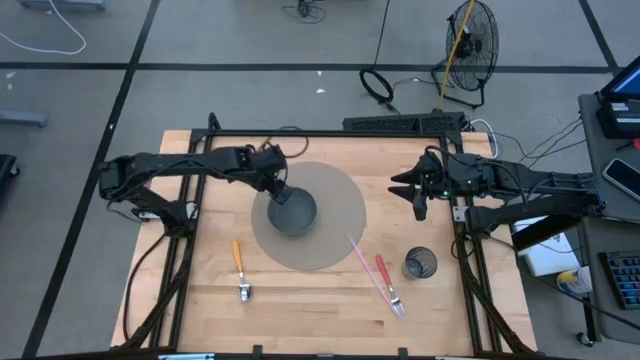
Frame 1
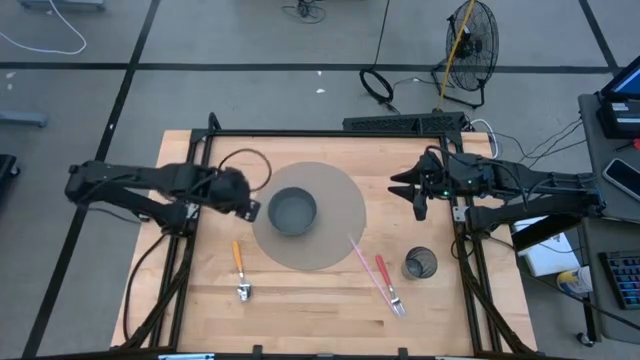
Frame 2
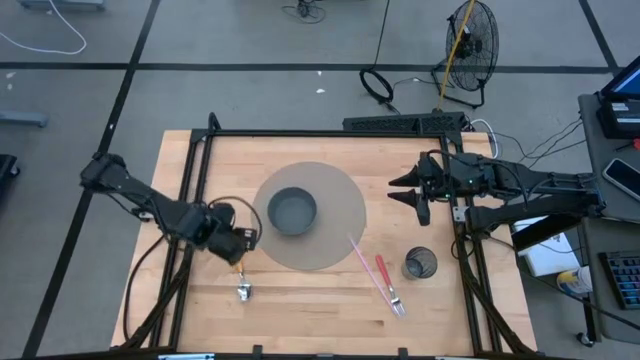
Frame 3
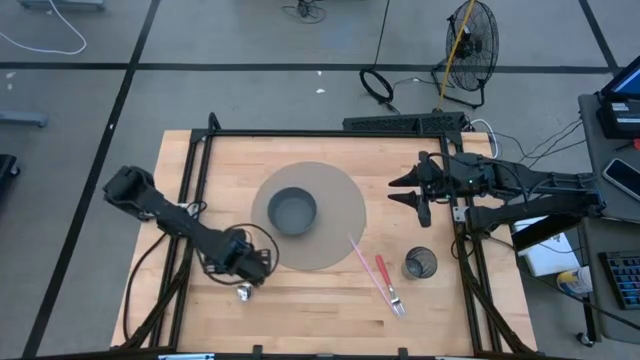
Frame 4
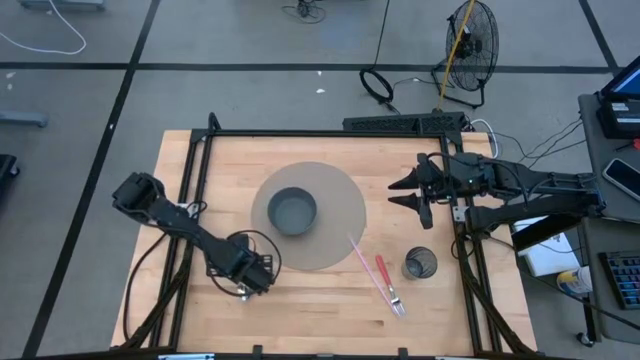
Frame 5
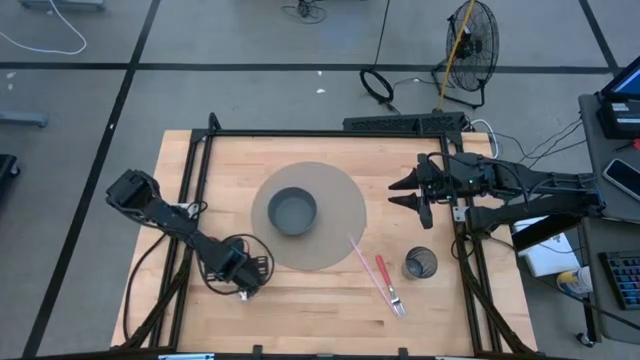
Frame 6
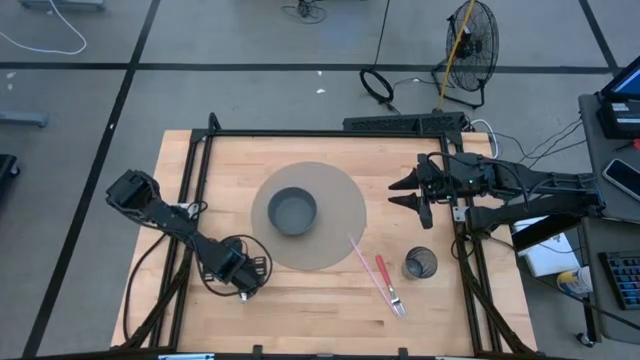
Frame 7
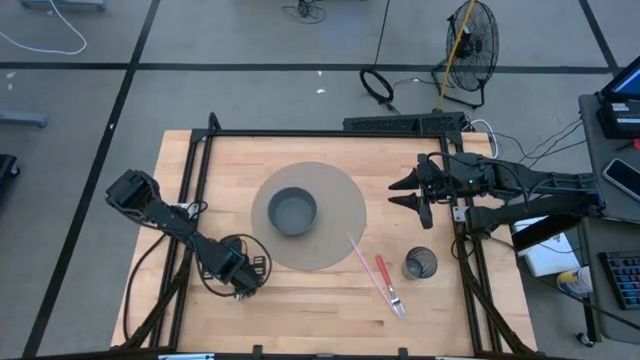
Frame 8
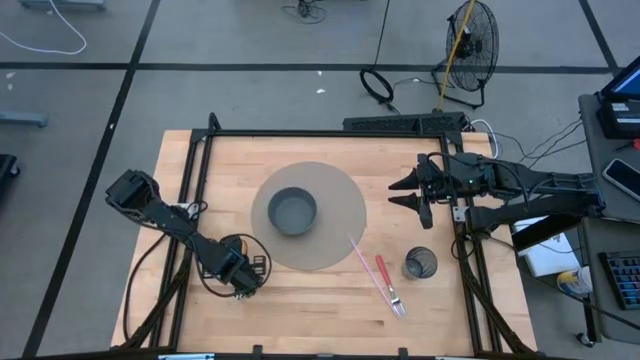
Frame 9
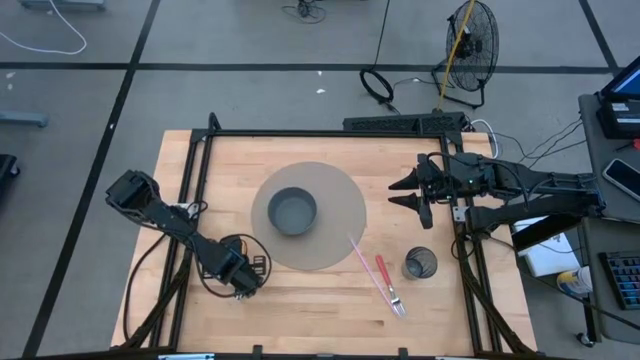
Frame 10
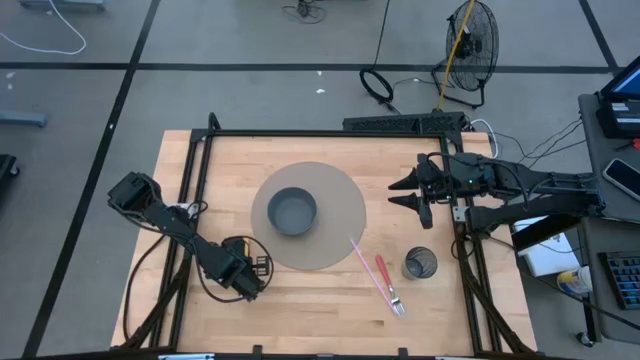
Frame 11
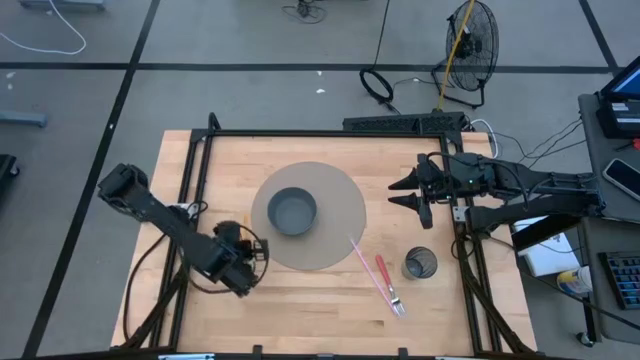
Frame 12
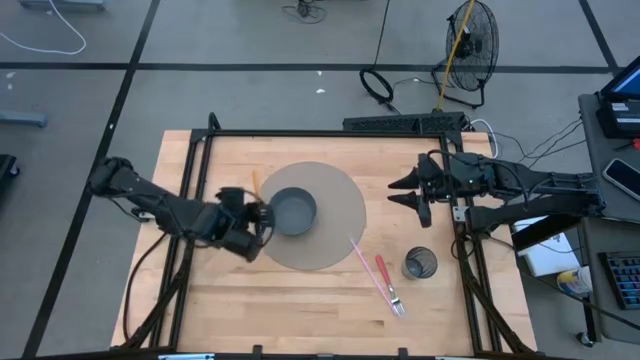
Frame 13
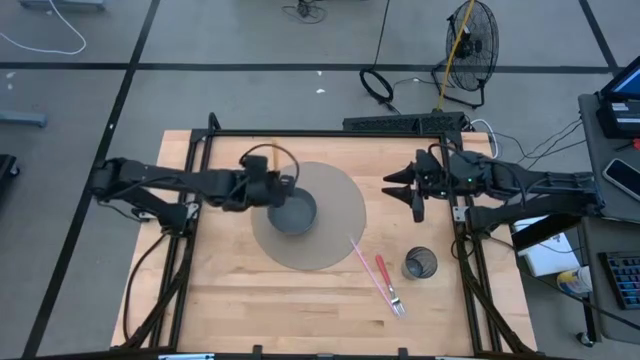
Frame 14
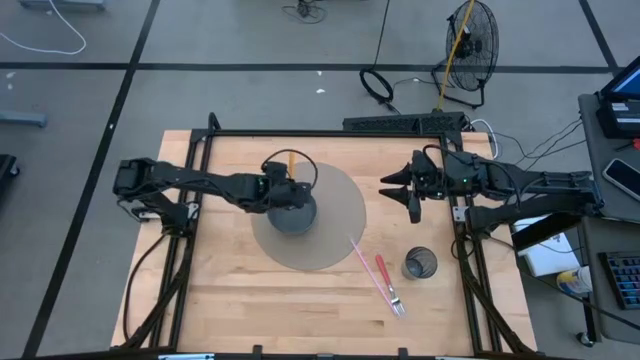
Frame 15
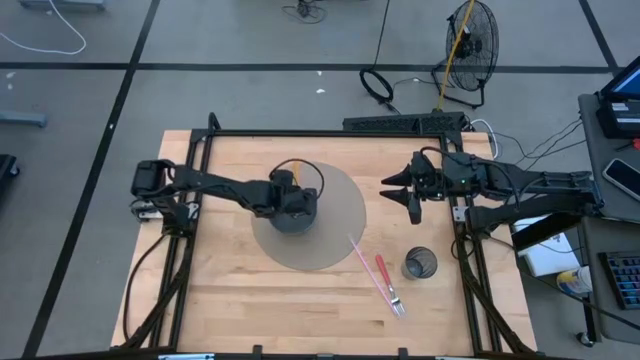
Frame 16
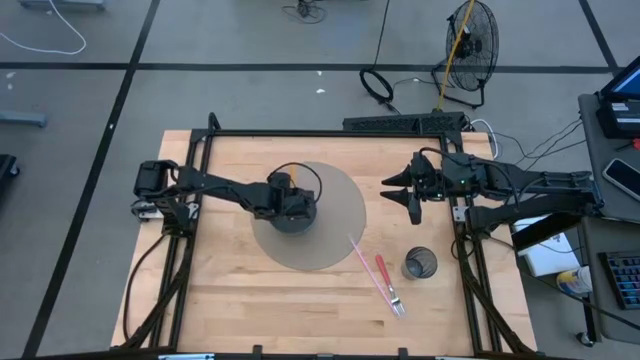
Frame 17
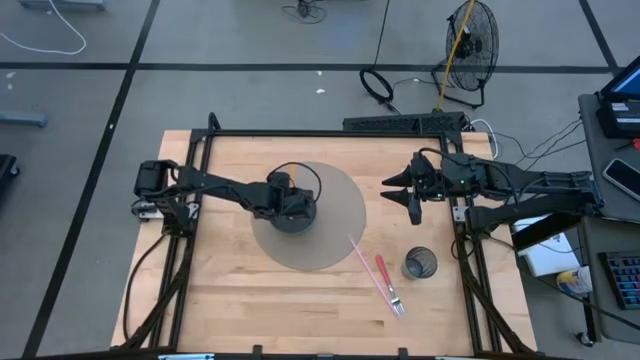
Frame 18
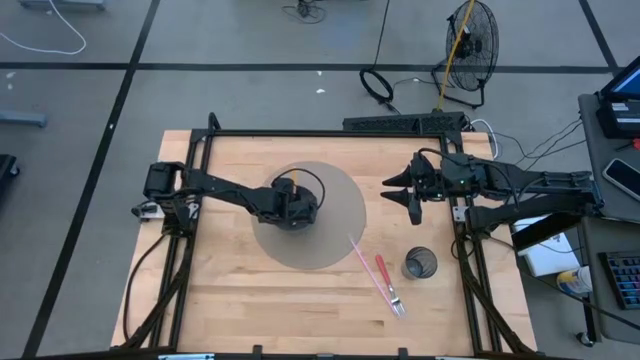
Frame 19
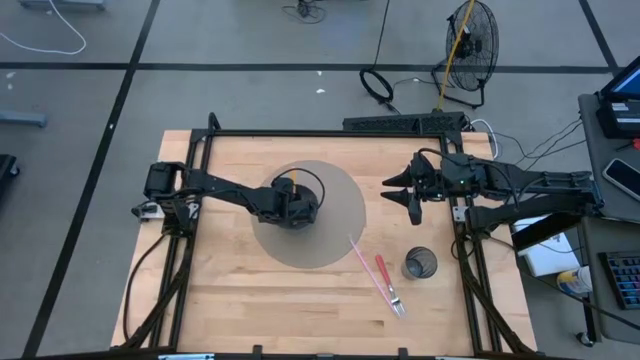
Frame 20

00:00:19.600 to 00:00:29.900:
Task: Pick & Place Utensil
Put the yellow spoon into the gray bowl

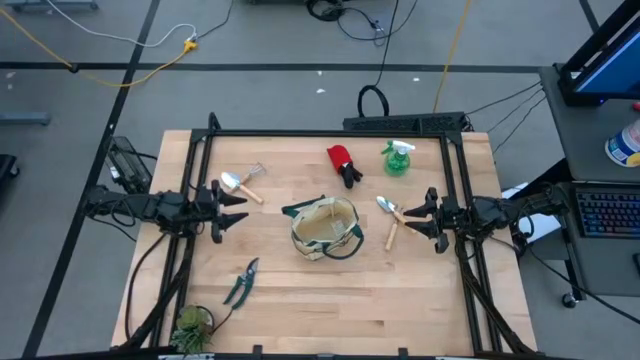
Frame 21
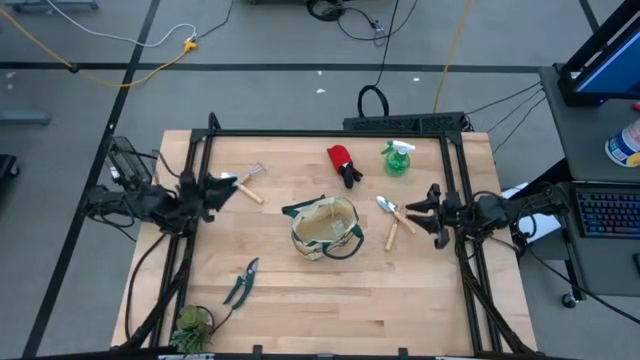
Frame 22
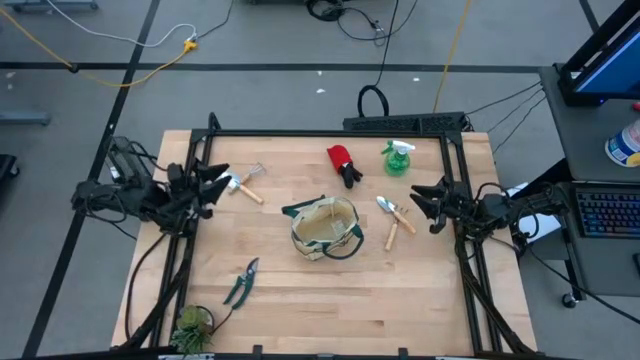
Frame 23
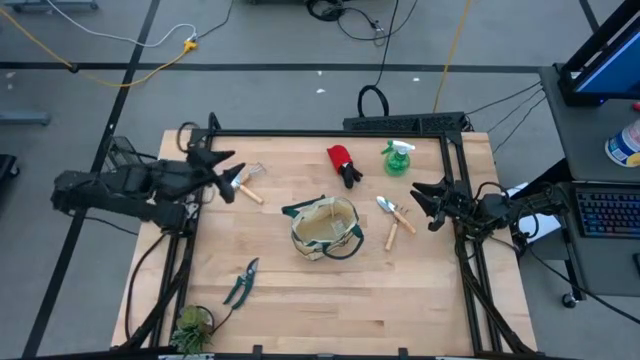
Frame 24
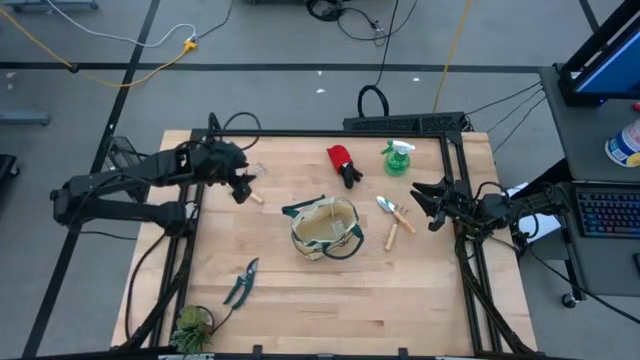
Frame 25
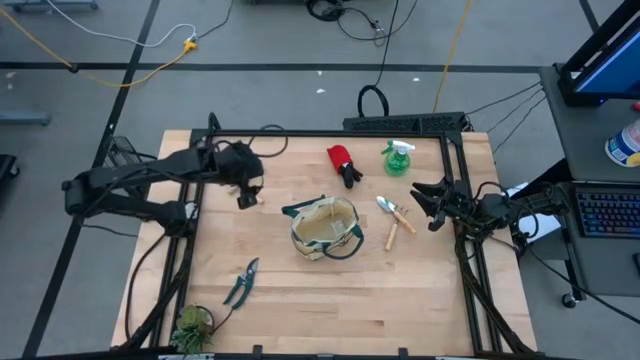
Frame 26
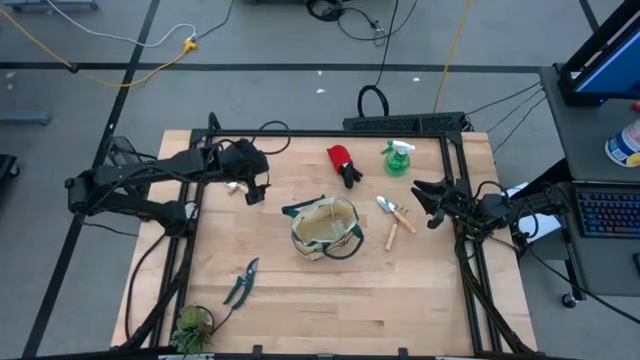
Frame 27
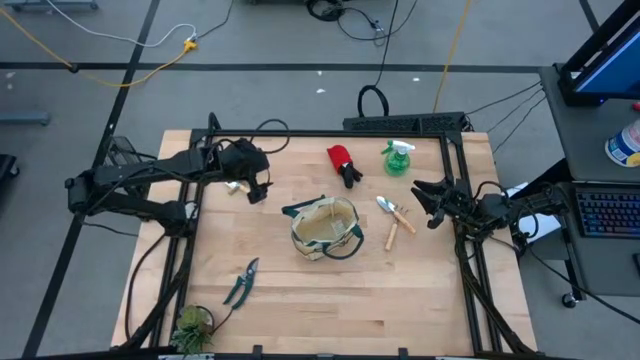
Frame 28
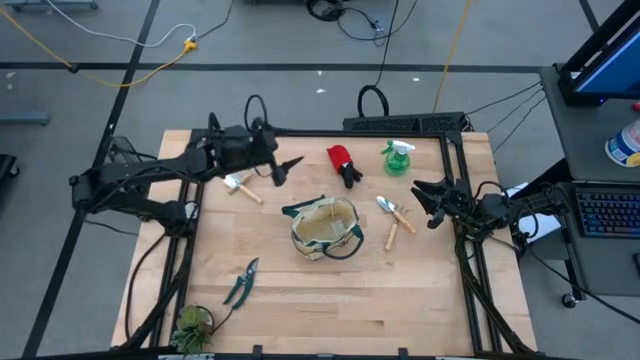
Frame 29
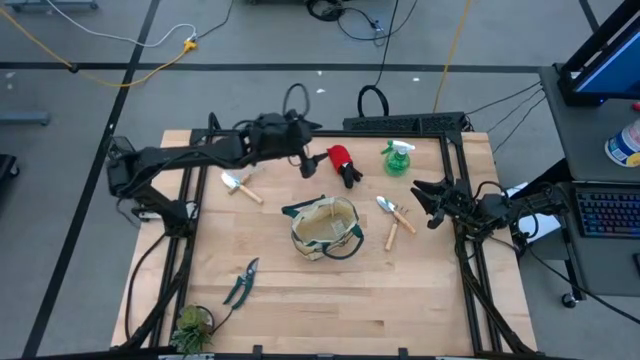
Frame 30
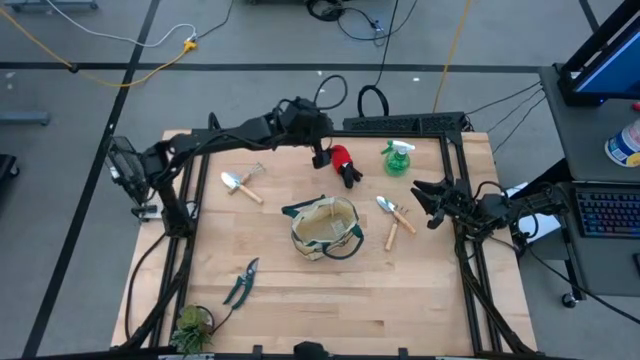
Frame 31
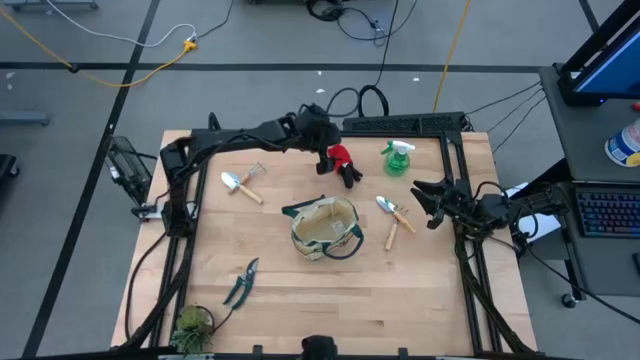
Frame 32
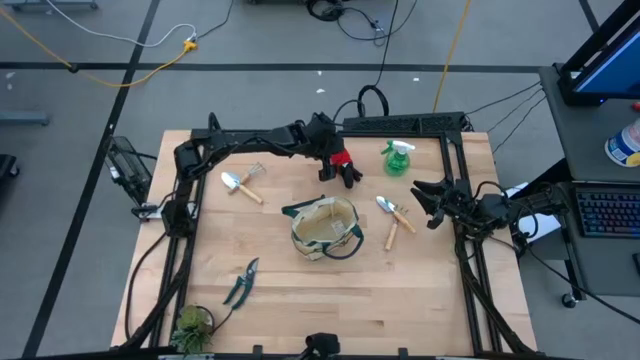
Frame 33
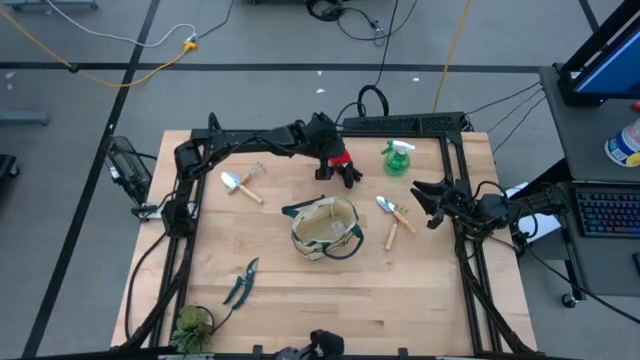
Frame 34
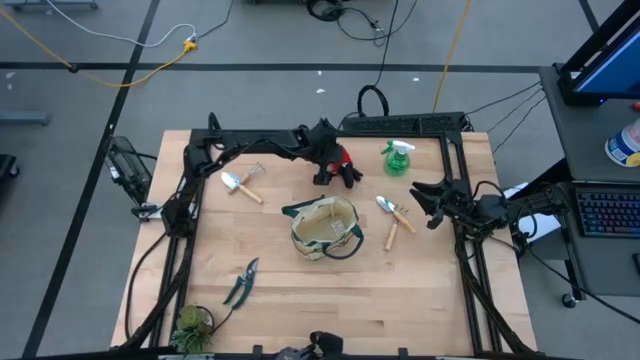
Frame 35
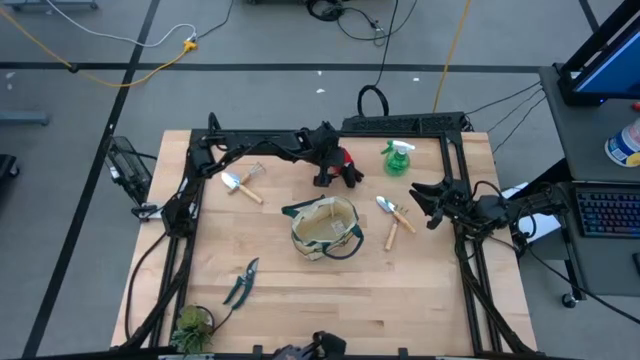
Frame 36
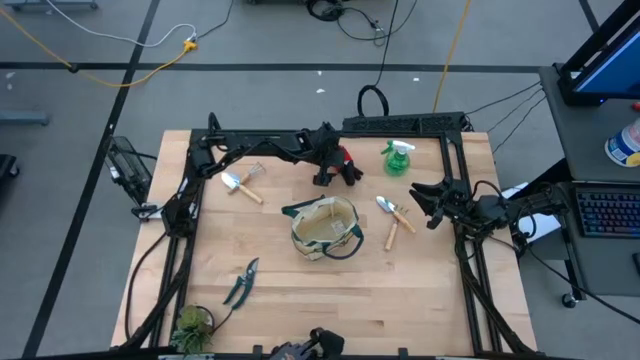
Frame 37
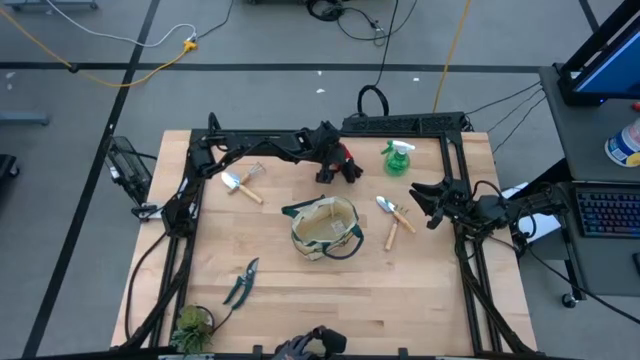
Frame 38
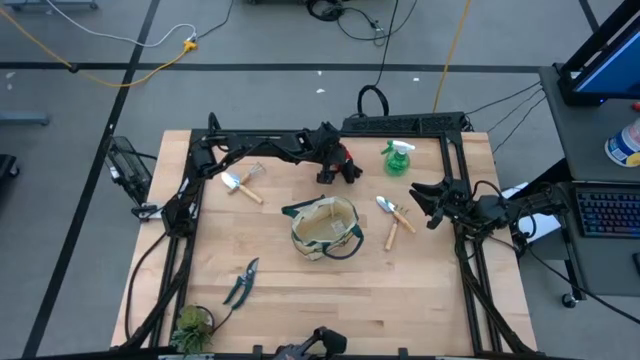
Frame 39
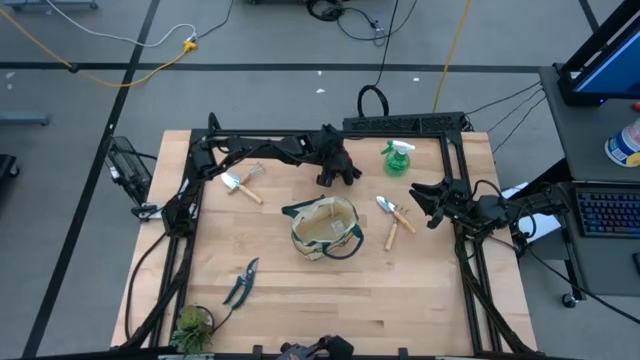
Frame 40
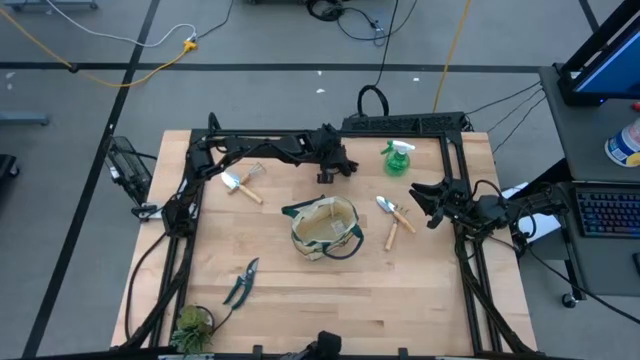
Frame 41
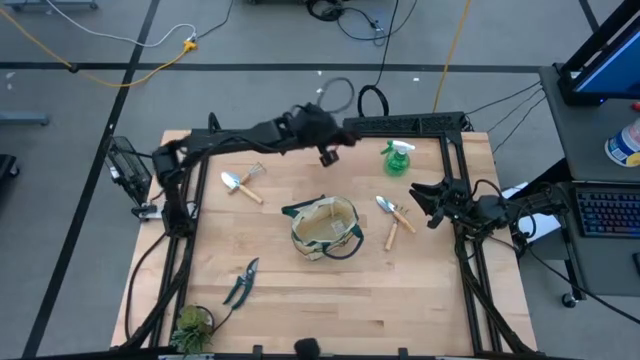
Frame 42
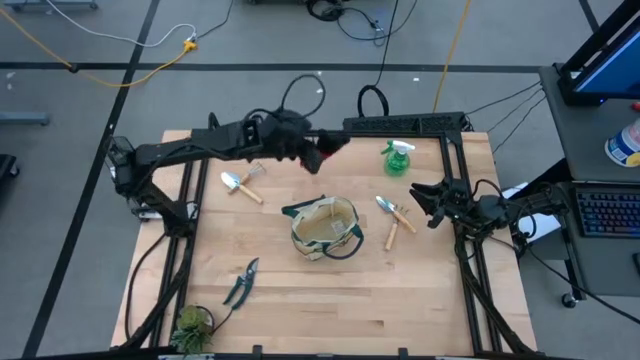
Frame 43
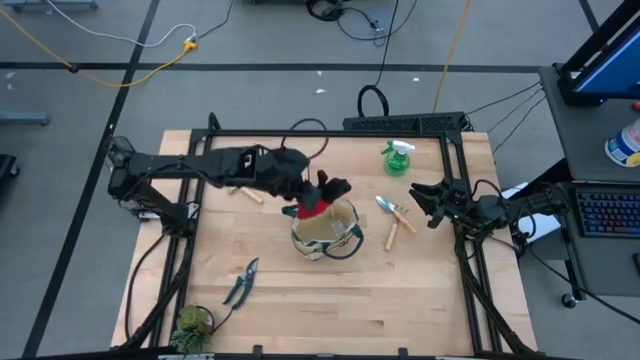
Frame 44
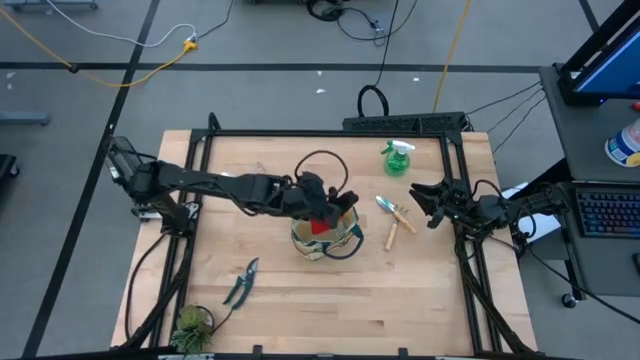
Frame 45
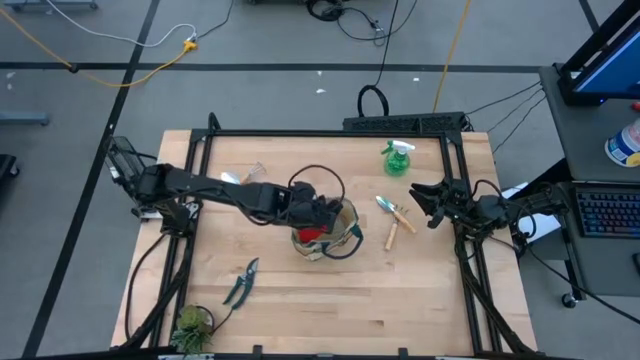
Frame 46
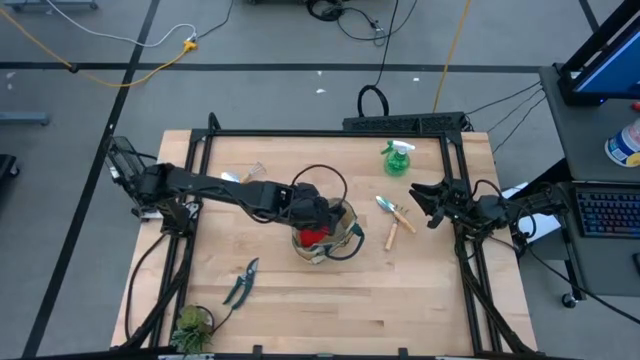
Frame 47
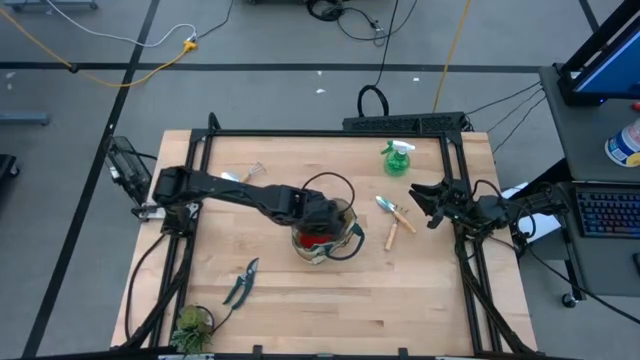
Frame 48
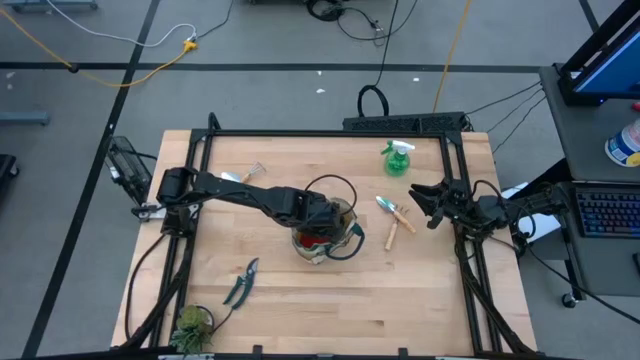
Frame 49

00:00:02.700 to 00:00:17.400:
Task: Pick & Place Garden tools in Gardening bag
Put the red gloves into the gardening bag
